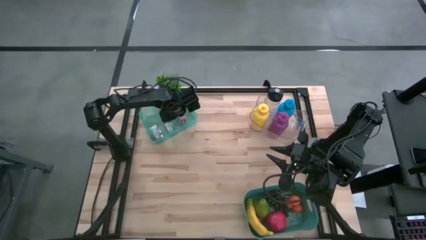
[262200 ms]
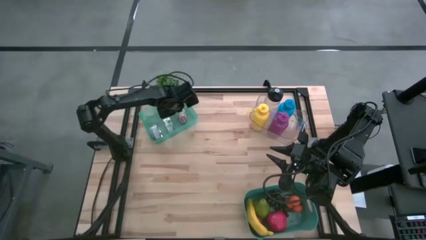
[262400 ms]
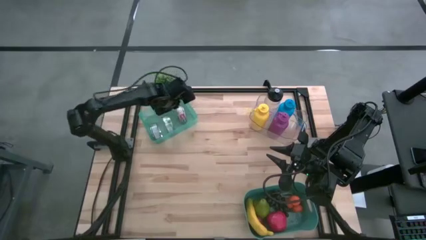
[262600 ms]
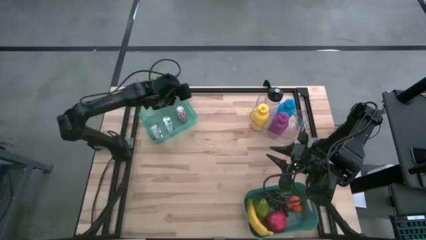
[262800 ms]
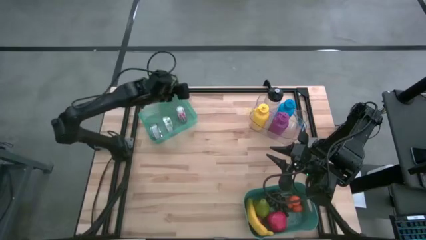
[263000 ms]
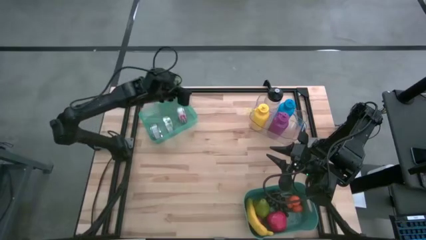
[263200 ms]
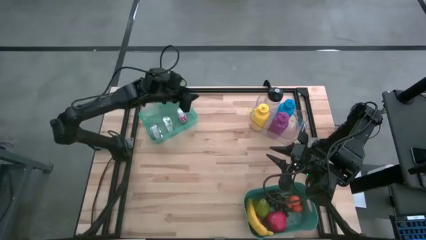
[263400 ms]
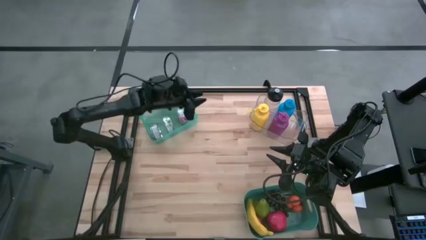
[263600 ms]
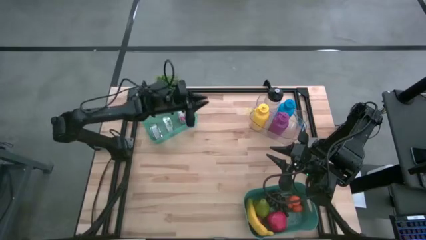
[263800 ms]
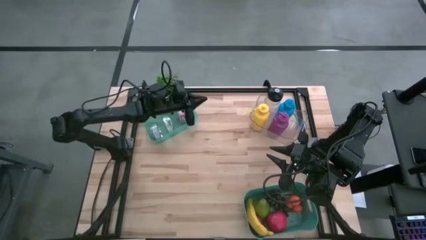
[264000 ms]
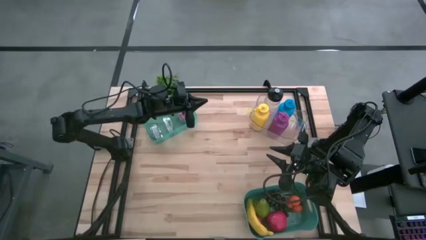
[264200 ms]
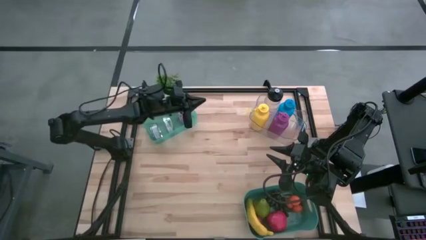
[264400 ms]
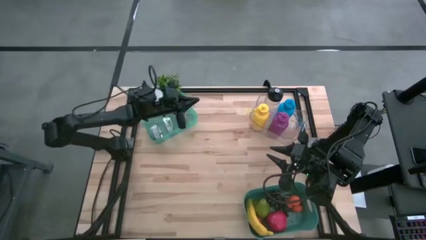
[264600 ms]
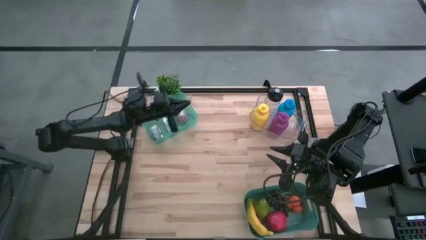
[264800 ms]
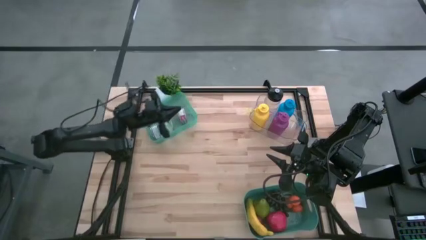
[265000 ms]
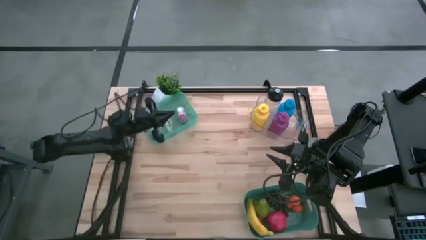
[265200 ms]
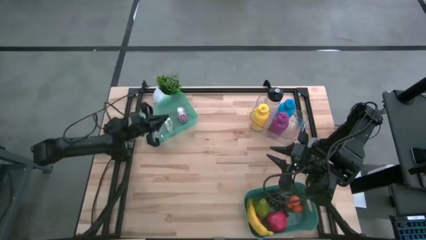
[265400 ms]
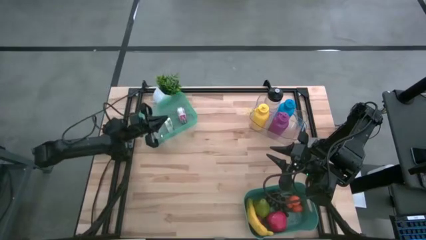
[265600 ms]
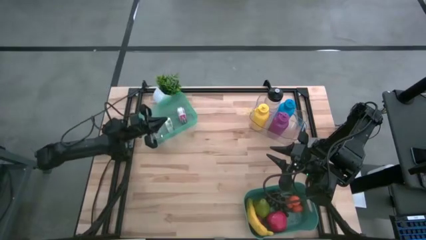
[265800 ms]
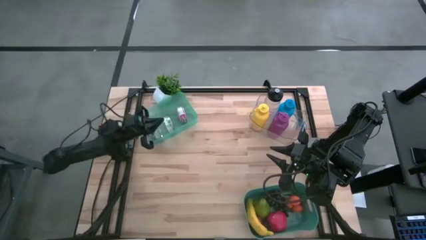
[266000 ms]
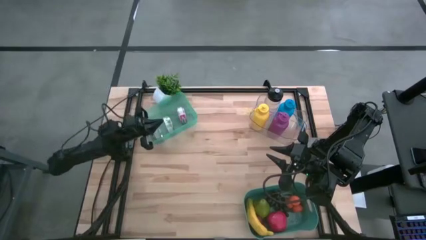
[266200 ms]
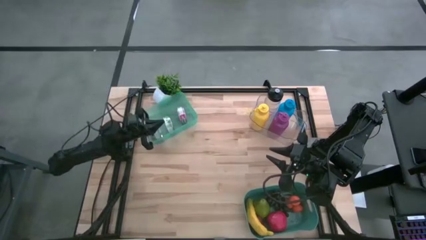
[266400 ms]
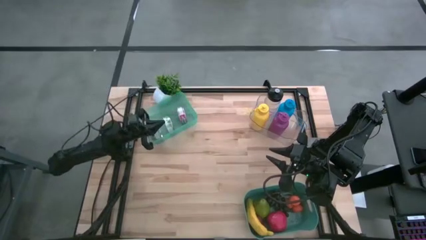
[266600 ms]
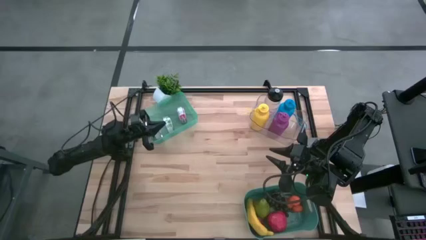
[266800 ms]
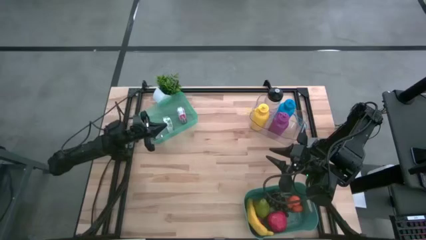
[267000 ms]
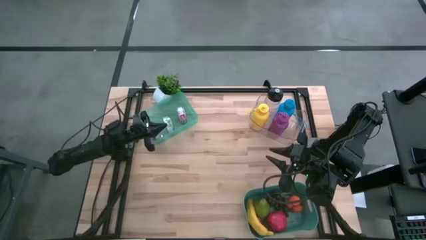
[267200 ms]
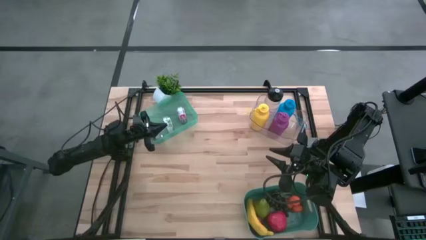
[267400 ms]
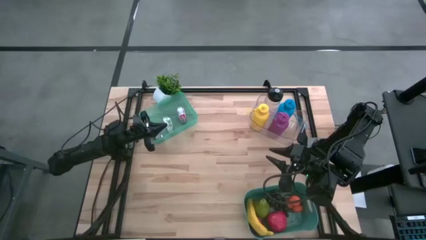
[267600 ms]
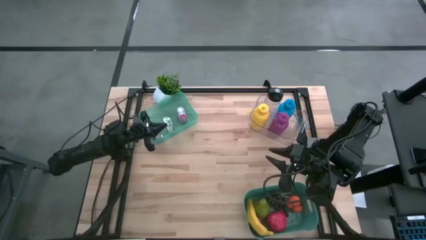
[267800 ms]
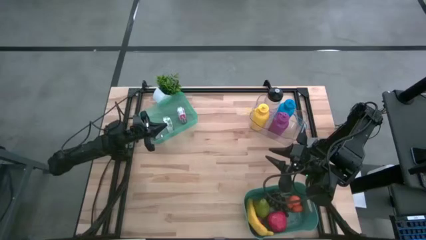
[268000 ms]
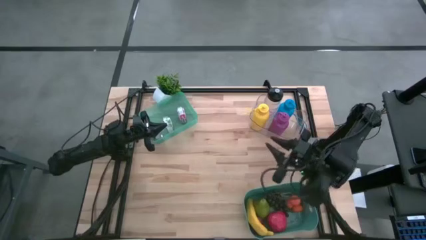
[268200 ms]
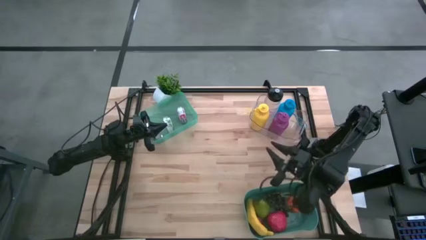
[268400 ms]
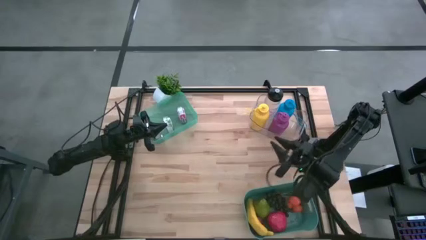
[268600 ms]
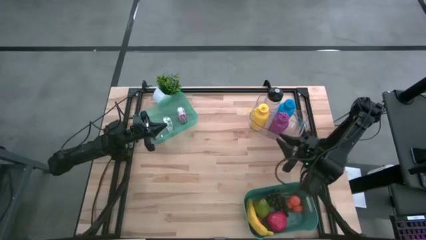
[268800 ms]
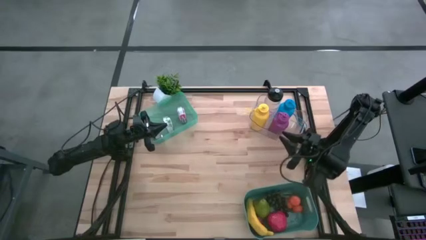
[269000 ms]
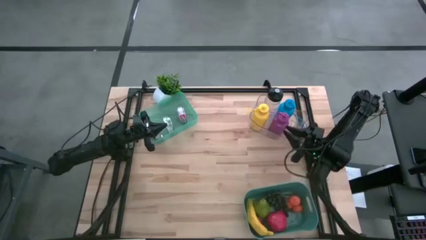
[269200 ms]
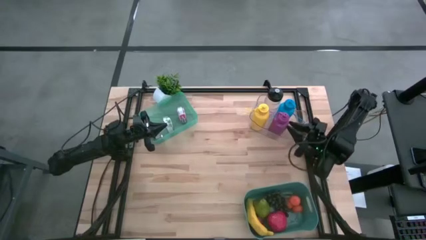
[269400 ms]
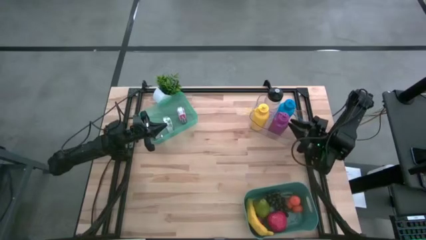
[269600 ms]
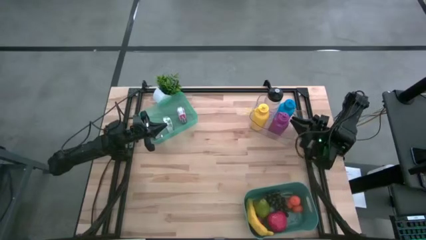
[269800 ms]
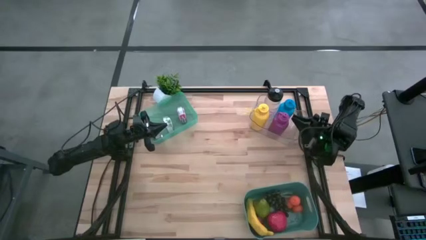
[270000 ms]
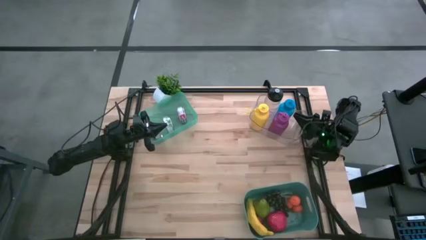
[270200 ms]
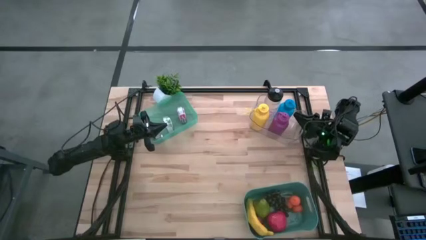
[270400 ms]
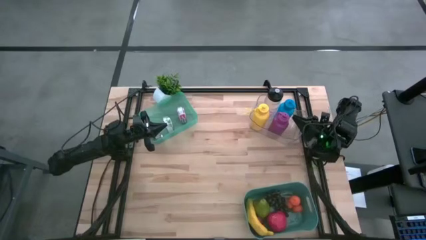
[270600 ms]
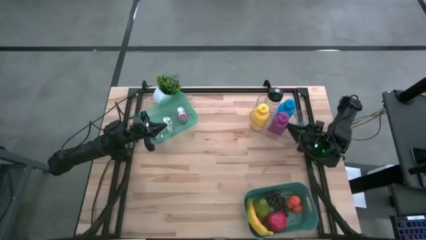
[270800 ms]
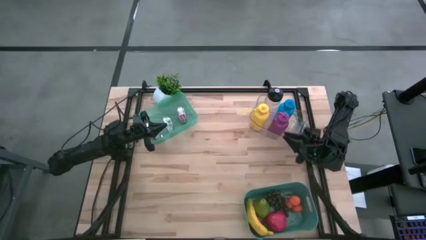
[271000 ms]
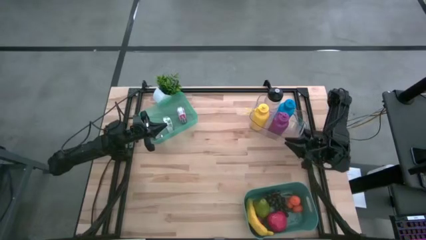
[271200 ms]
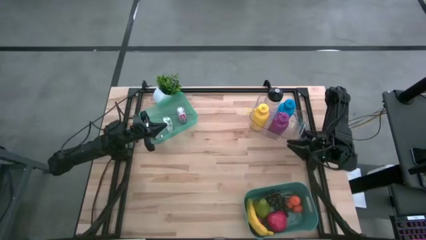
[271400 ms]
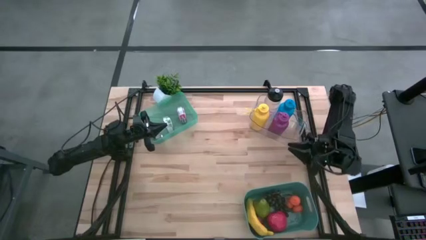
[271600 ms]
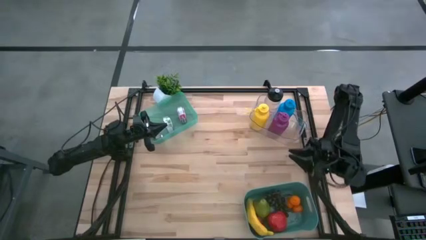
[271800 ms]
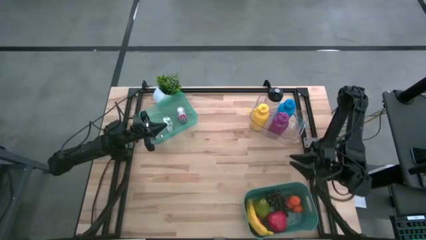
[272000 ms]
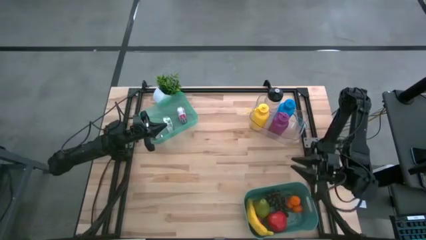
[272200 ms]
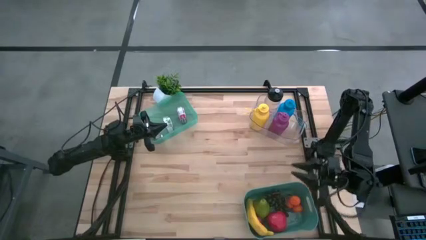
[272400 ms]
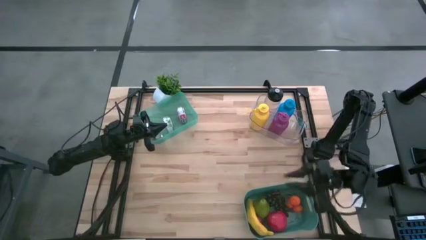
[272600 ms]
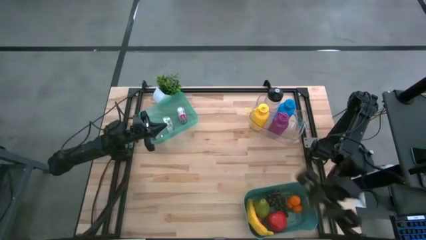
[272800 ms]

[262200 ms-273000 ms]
Task: Pick & Place Food Item
Return to Home Position

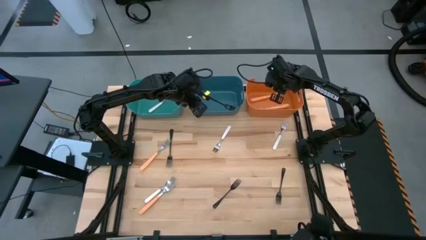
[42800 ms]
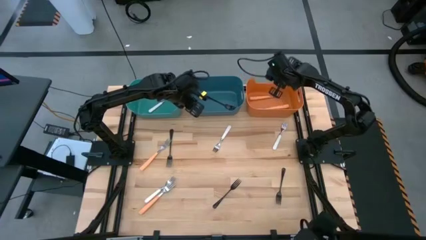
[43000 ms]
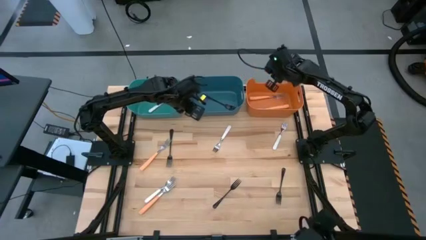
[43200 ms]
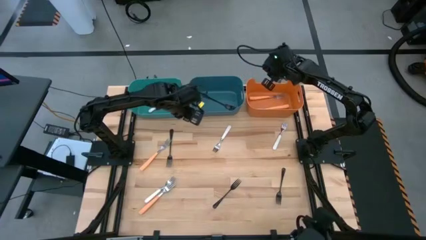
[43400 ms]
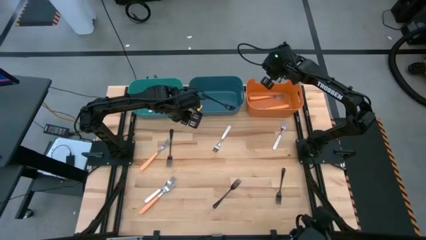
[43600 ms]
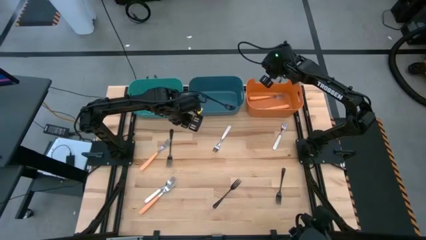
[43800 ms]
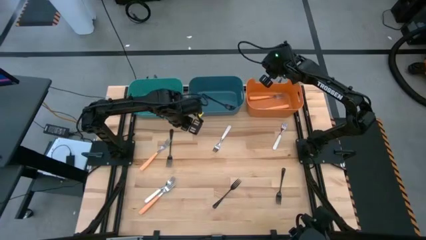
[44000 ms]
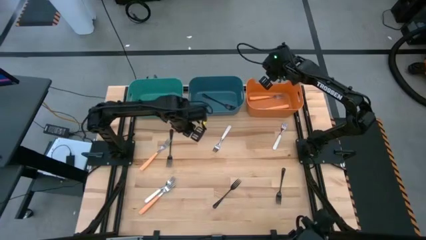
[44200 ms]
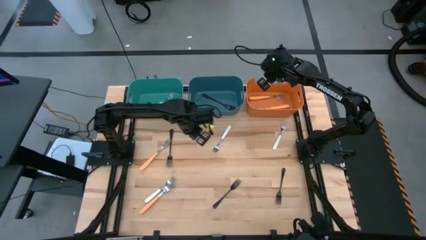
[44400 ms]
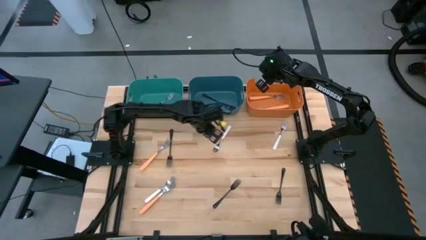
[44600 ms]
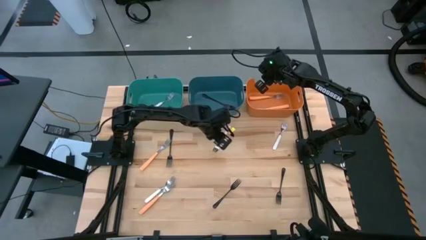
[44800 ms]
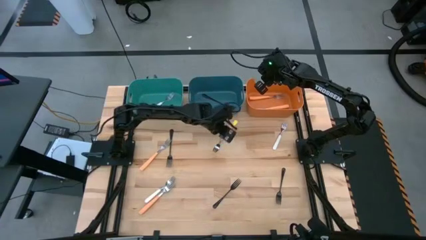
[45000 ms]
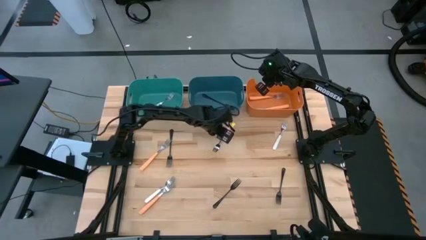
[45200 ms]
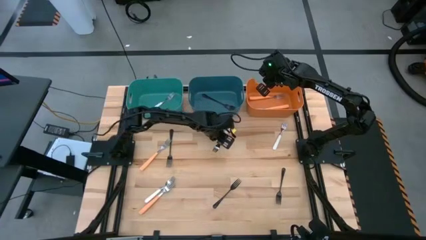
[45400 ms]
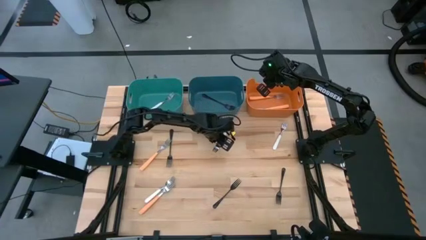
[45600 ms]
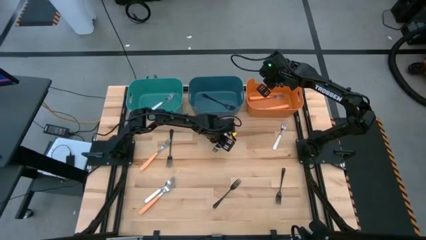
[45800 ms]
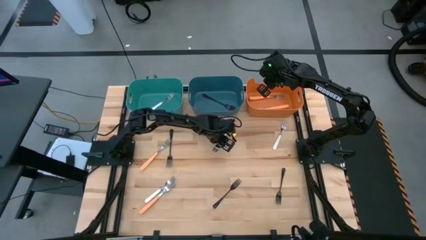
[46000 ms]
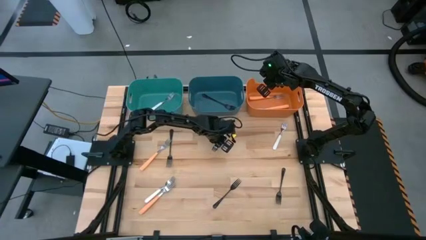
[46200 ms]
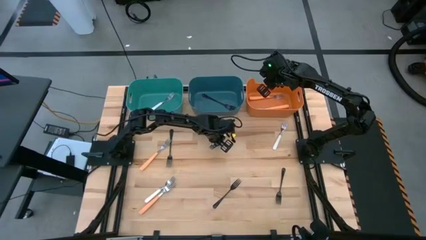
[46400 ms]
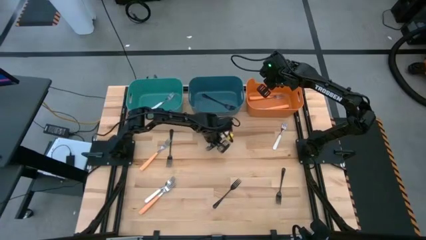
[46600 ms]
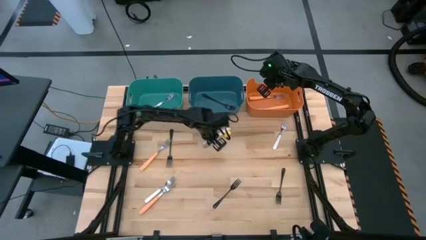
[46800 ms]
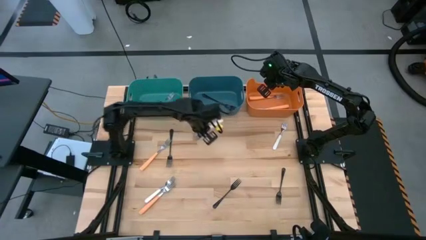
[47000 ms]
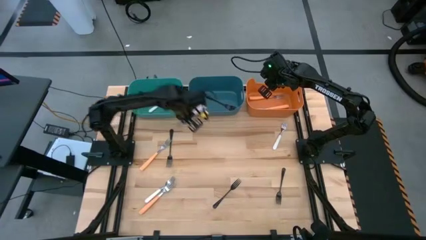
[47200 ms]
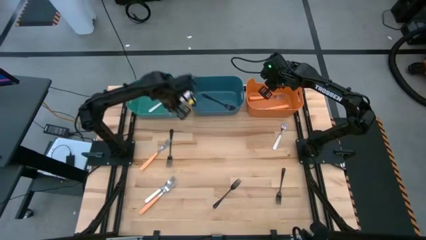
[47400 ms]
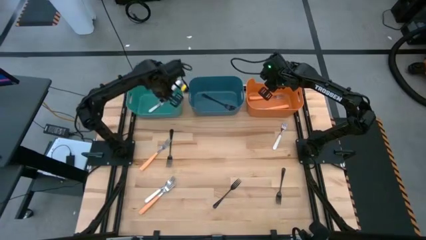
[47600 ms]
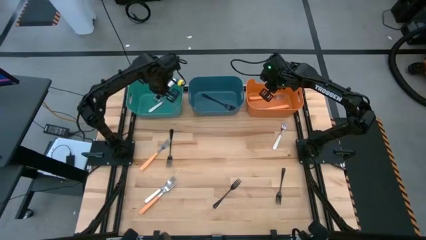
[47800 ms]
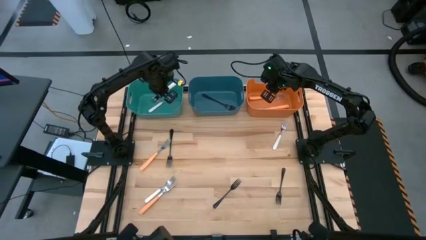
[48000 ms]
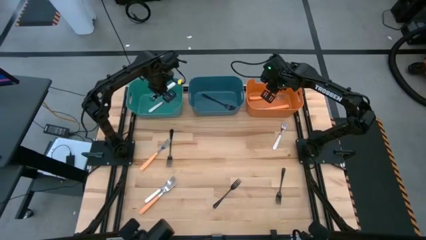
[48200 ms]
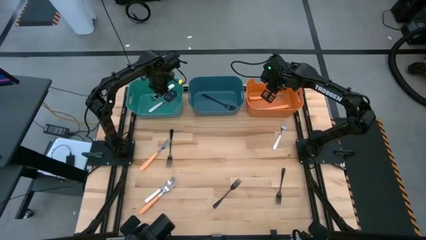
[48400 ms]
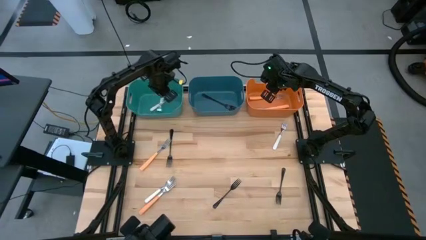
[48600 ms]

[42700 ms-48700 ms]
Task: Sort silverware by color (type)
Put the white fork into the green bin
